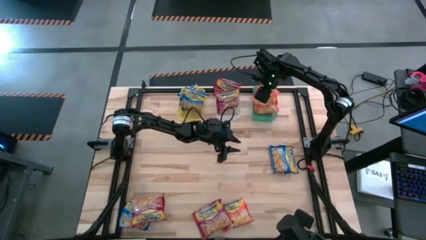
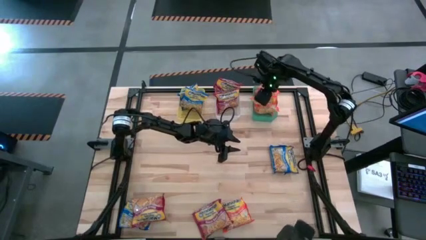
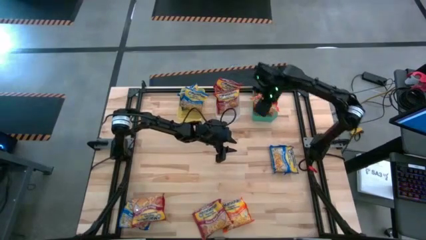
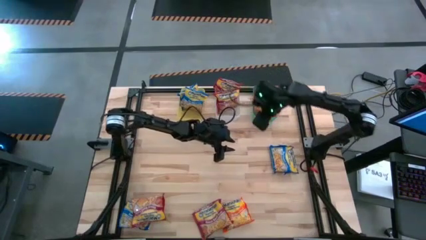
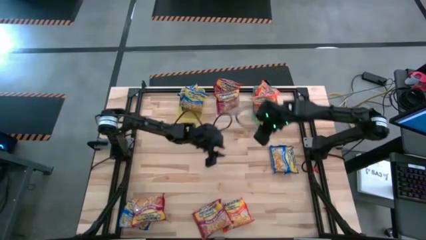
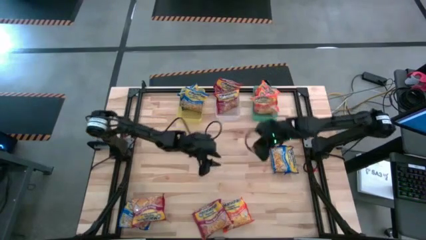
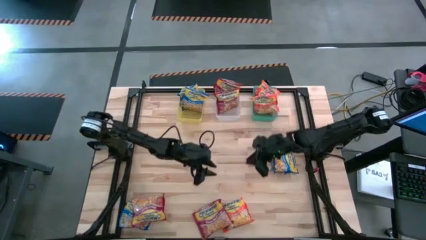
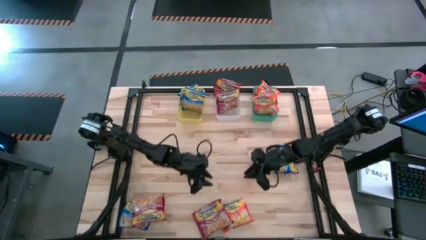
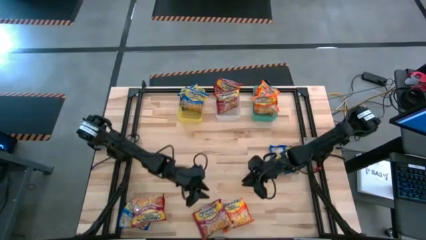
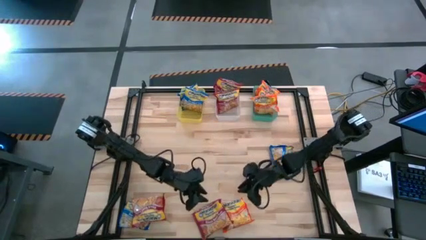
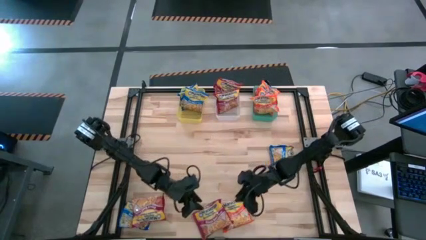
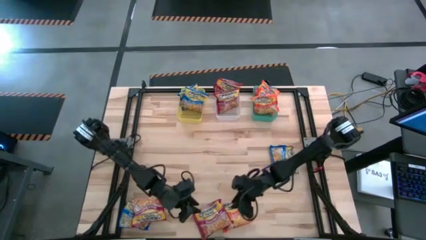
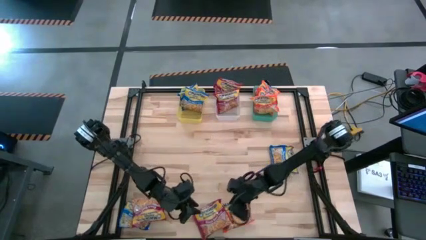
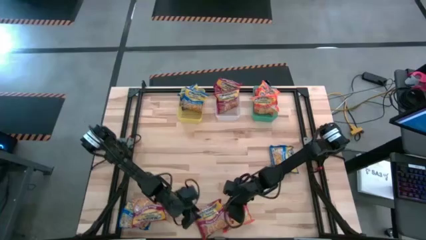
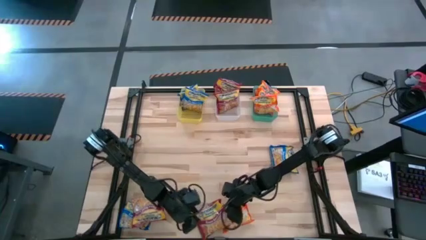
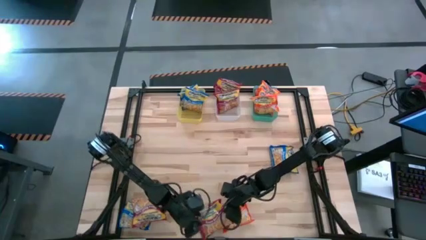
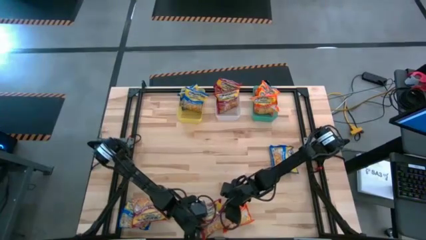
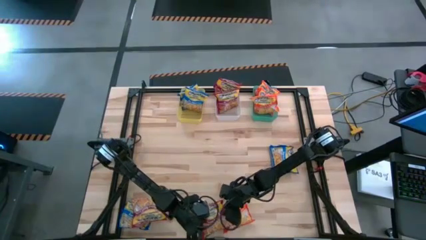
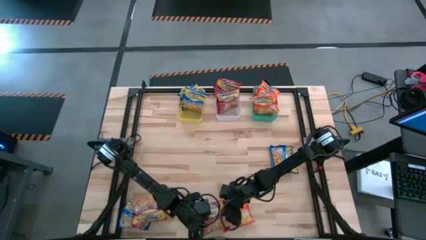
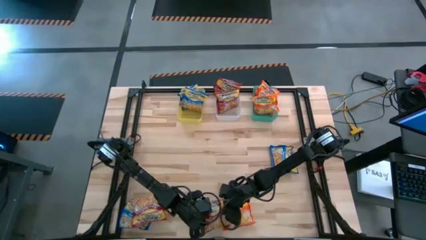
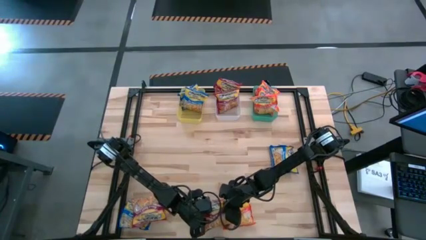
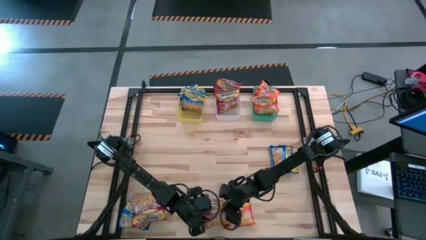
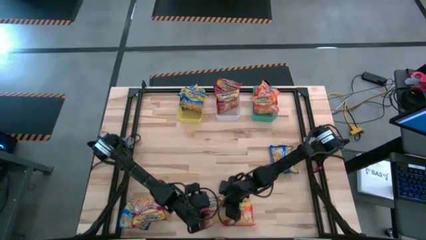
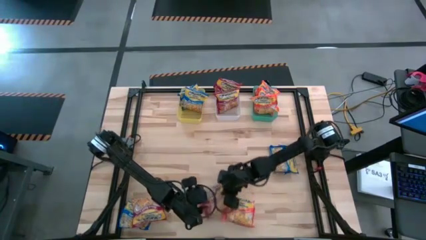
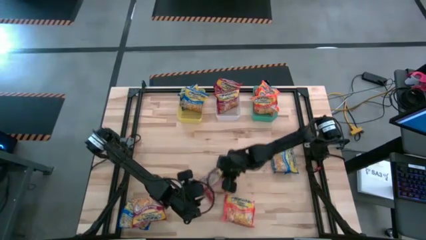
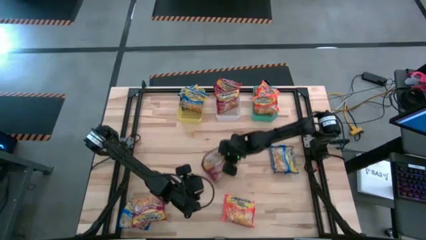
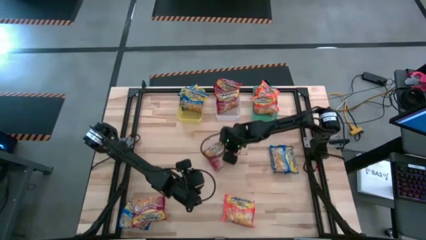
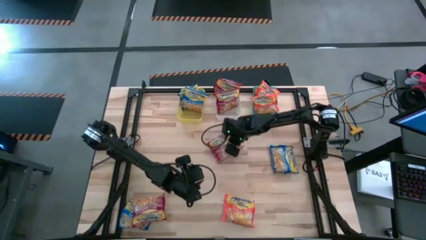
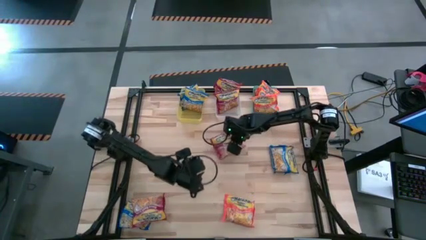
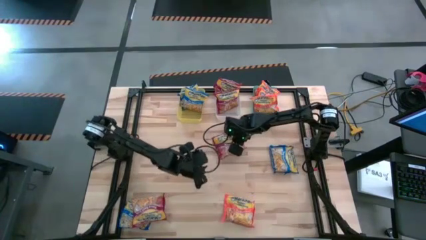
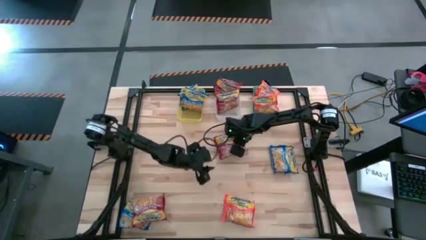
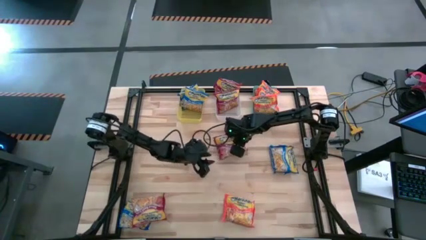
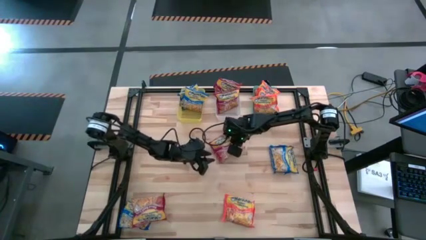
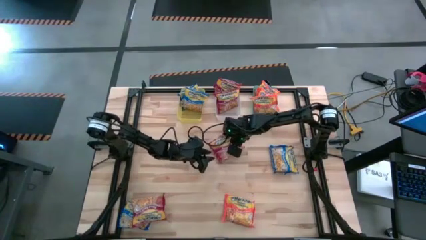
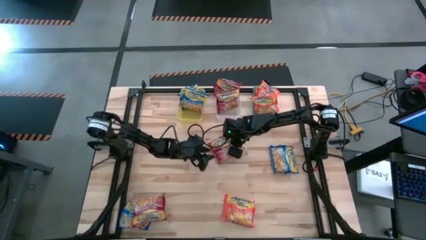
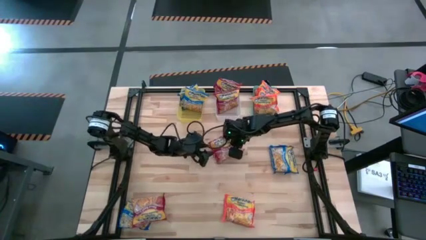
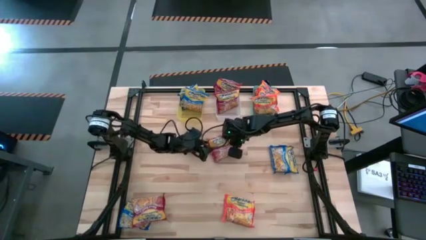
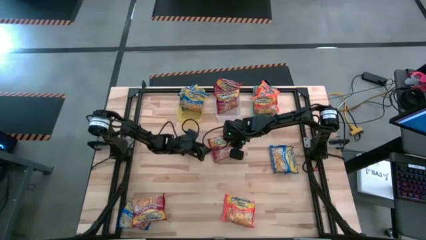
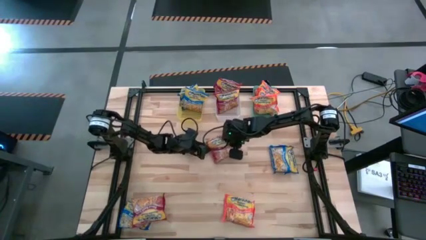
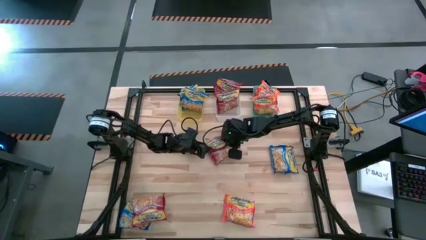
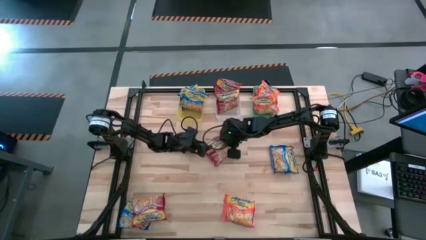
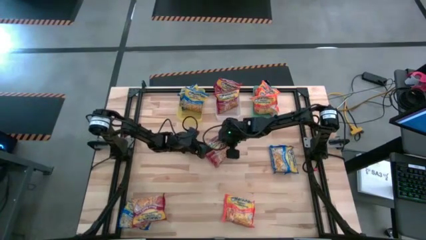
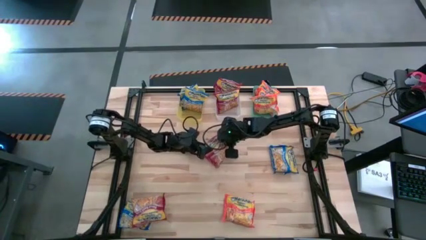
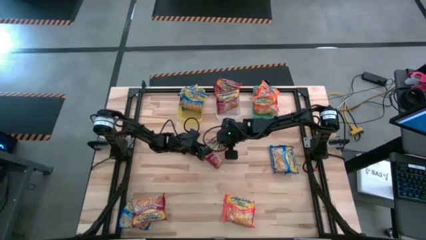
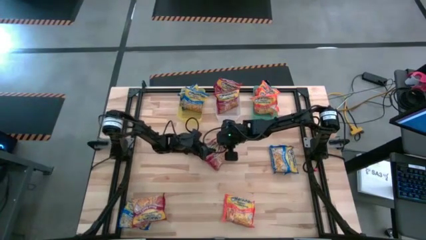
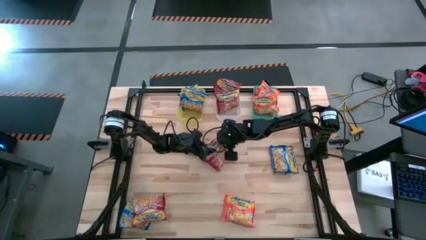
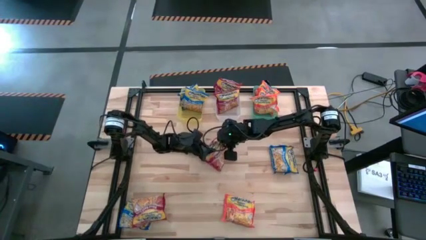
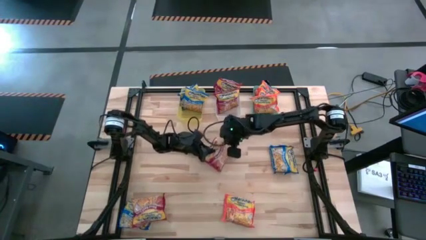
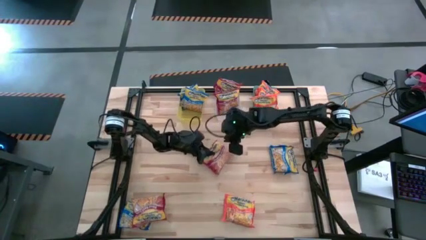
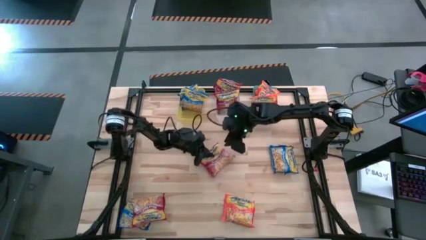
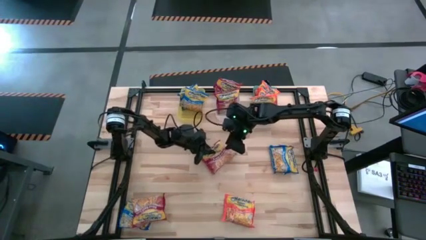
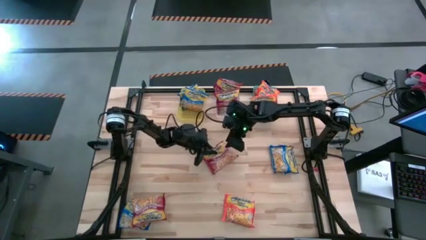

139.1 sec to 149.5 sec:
Task: Sort Maruchan noodles
Put the right red noodle pack into the white bin

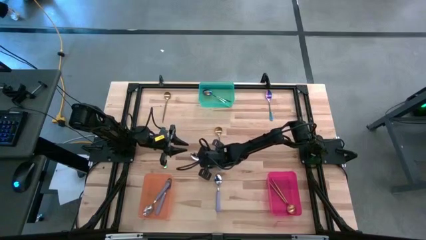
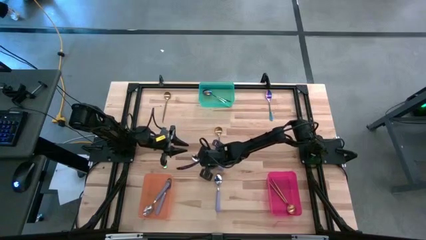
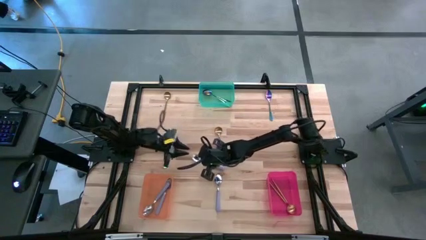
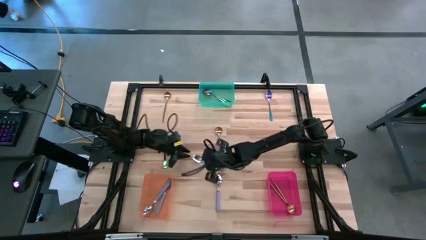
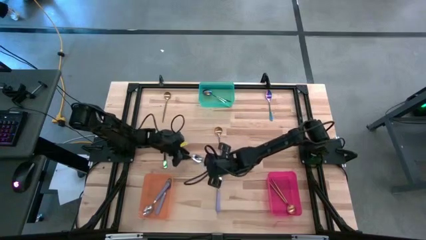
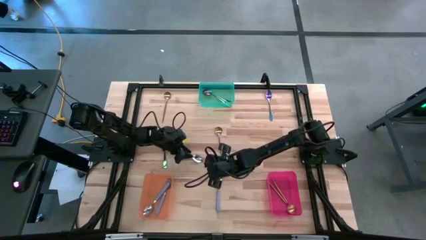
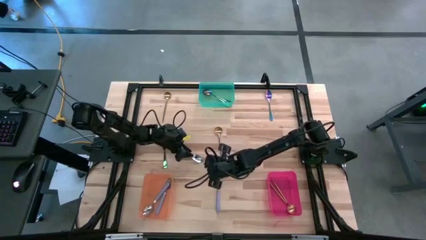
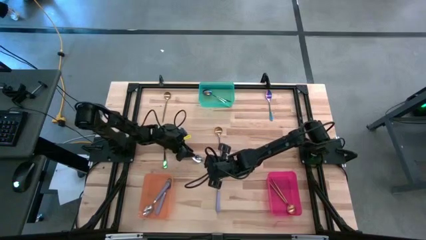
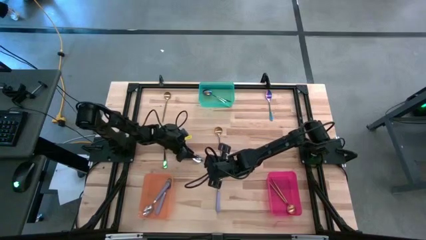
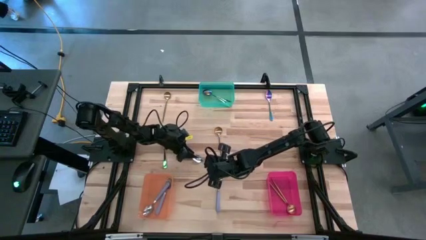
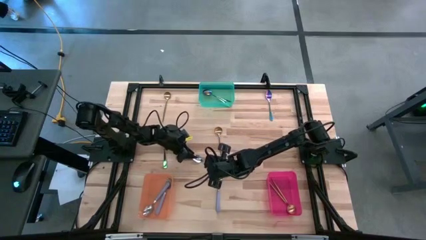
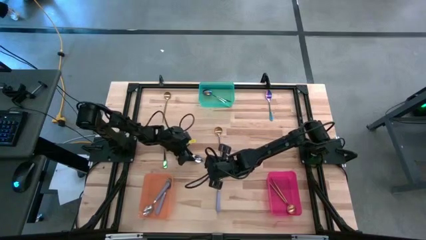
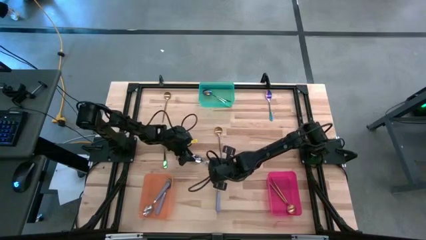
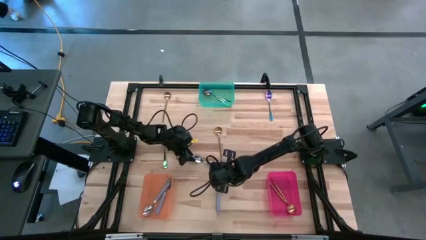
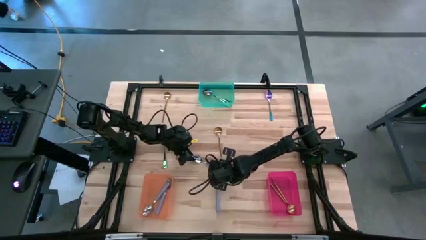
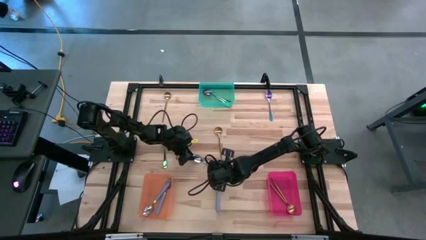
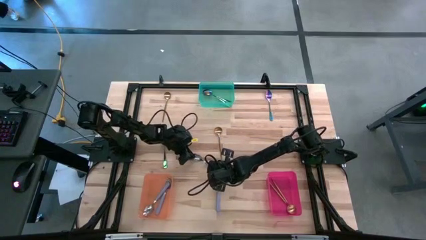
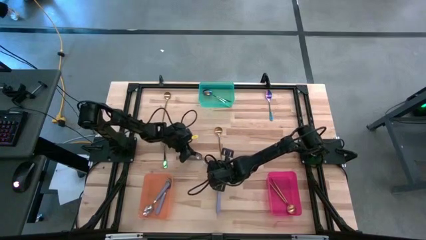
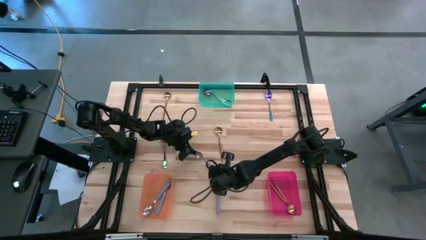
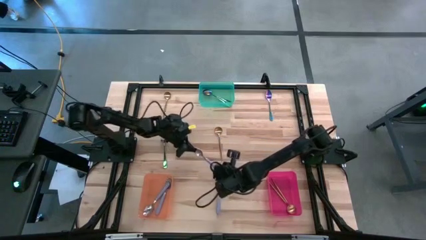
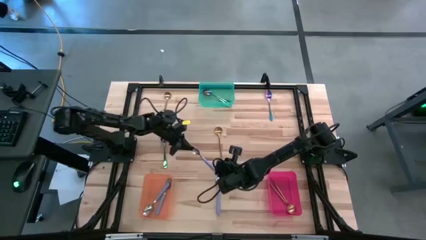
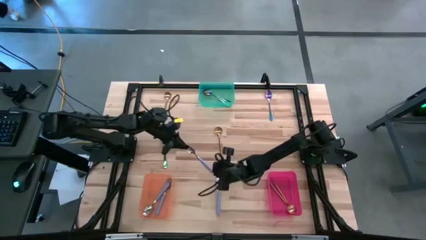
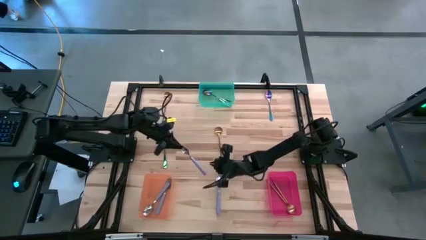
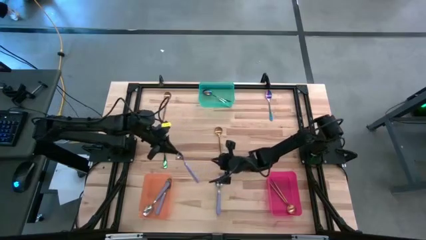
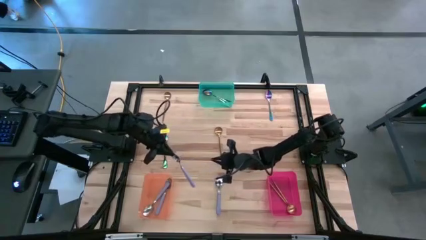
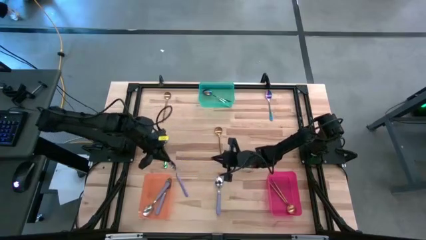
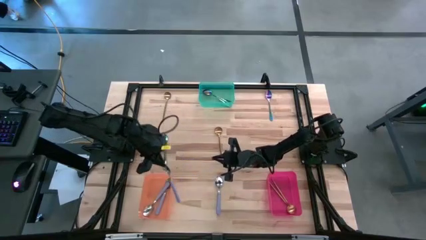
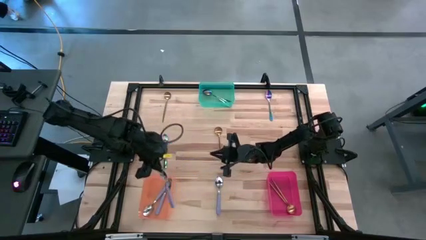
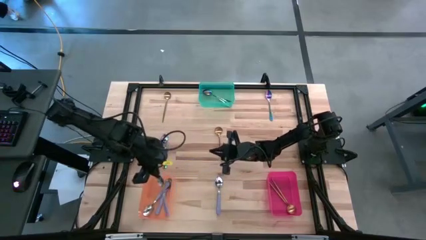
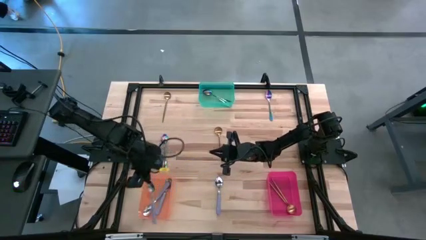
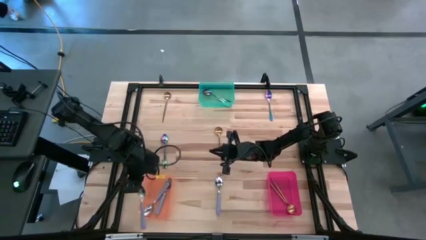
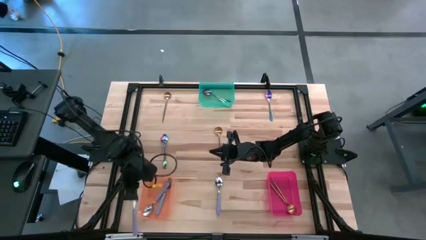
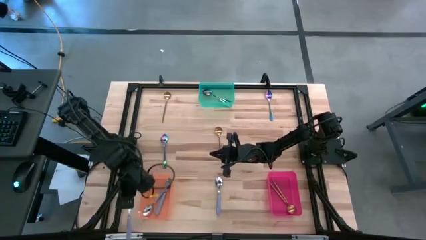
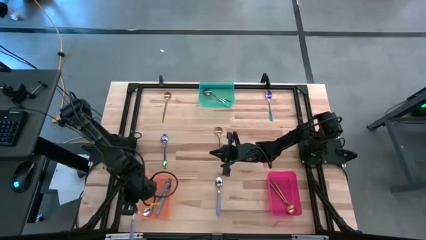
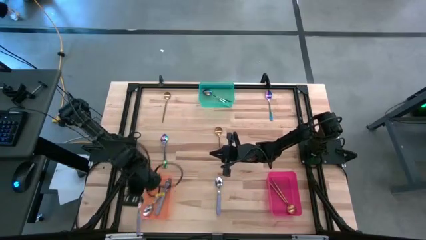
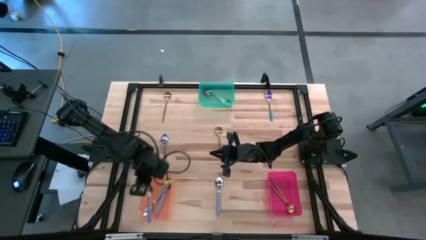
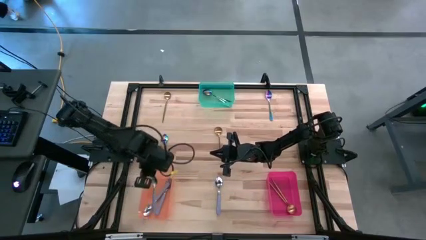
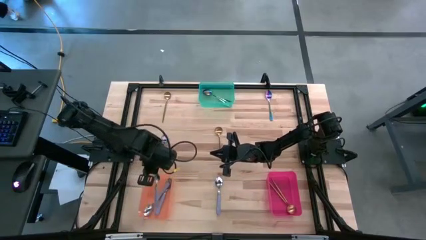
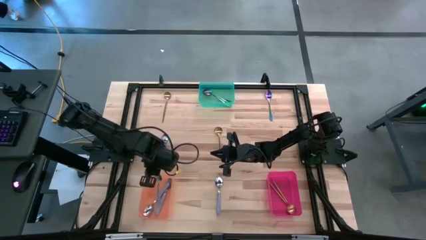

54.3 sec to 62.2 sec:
Task: Sort silverware by color (type)
Put the purple spoon into the orange bin
